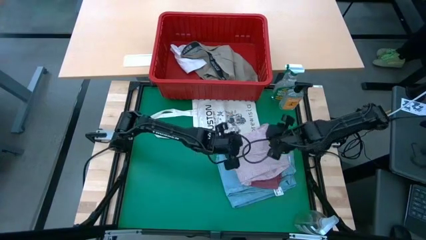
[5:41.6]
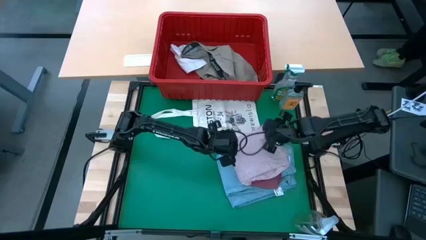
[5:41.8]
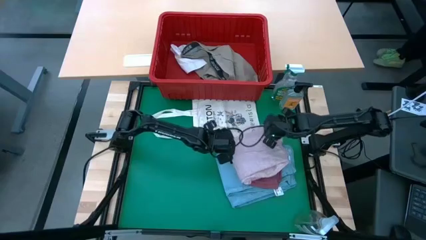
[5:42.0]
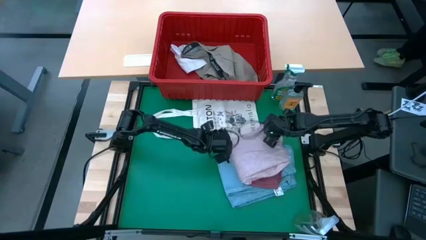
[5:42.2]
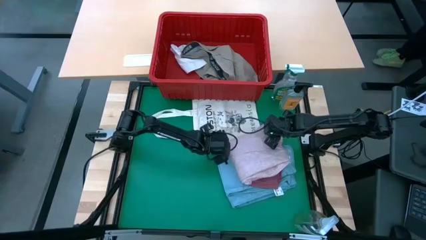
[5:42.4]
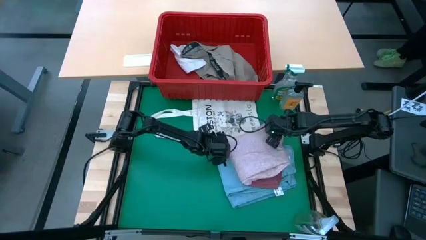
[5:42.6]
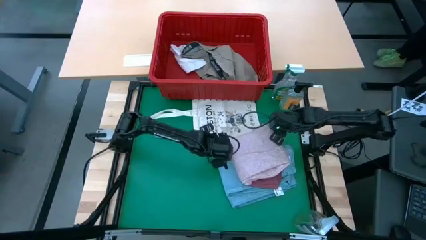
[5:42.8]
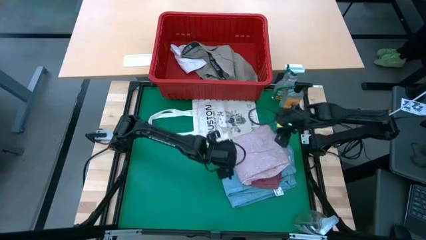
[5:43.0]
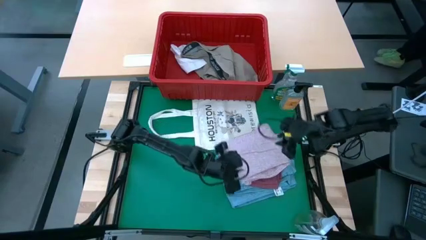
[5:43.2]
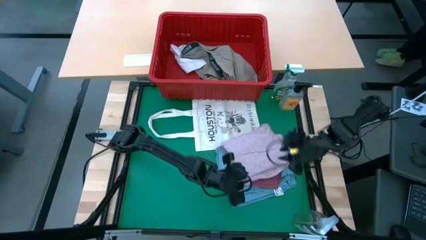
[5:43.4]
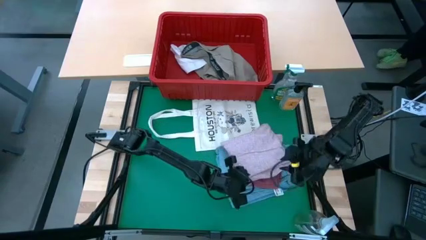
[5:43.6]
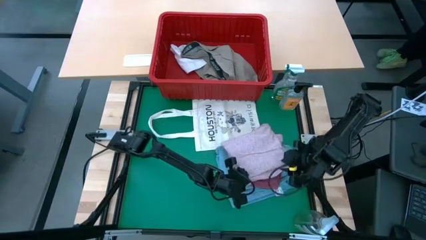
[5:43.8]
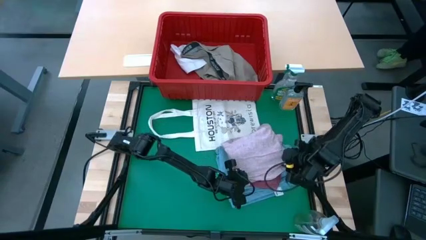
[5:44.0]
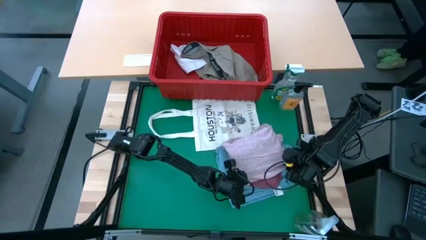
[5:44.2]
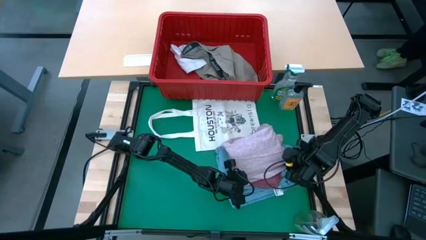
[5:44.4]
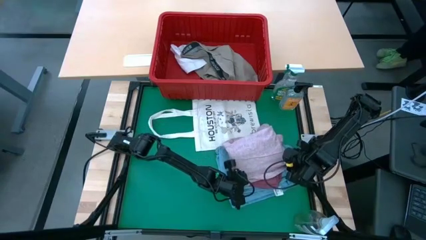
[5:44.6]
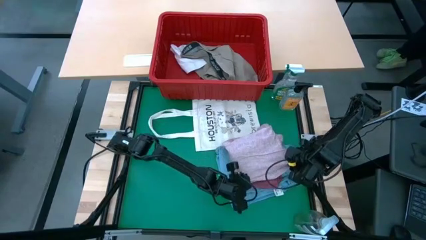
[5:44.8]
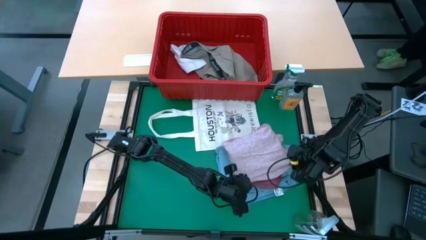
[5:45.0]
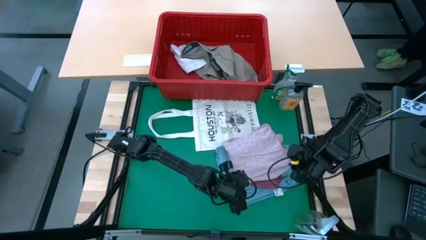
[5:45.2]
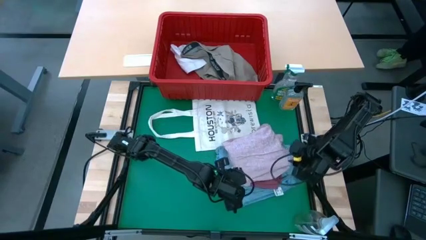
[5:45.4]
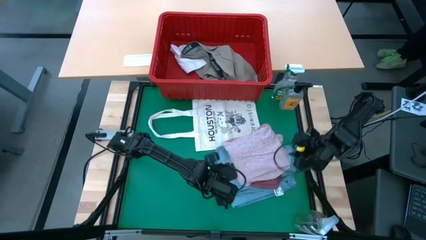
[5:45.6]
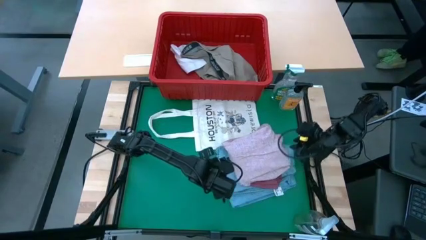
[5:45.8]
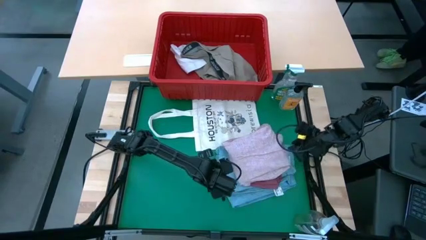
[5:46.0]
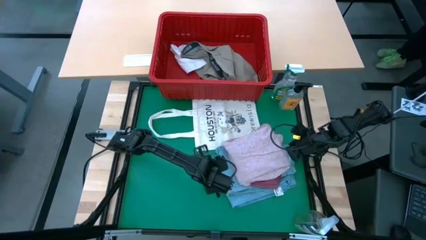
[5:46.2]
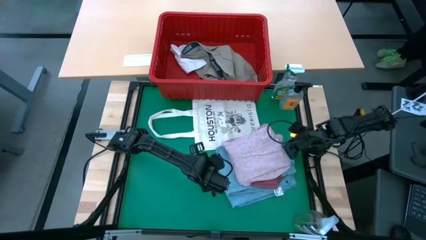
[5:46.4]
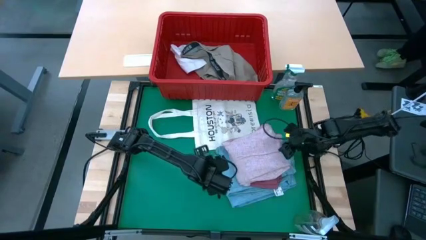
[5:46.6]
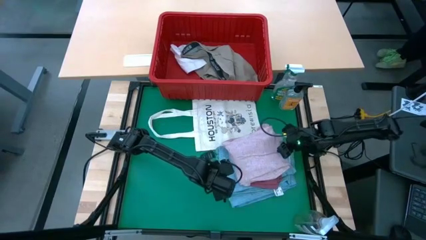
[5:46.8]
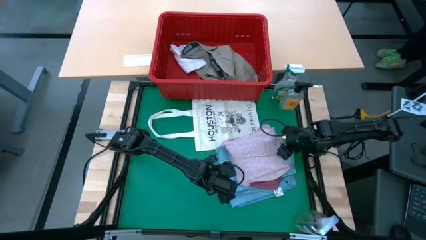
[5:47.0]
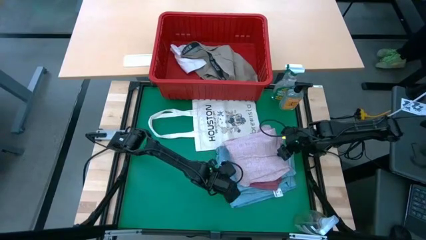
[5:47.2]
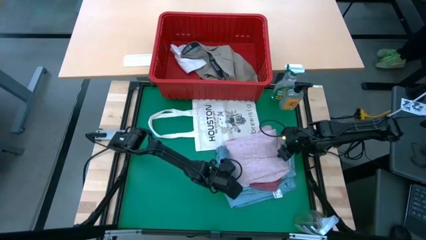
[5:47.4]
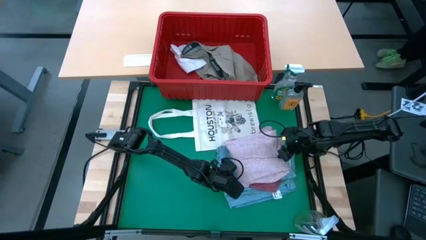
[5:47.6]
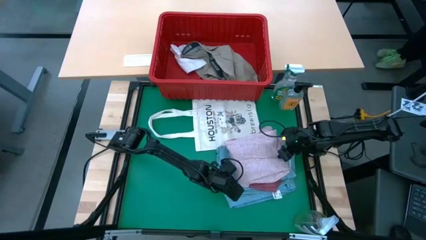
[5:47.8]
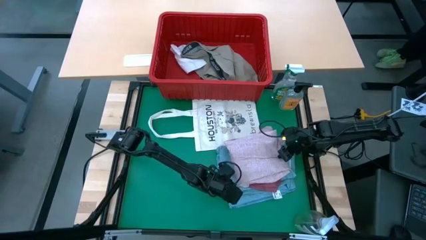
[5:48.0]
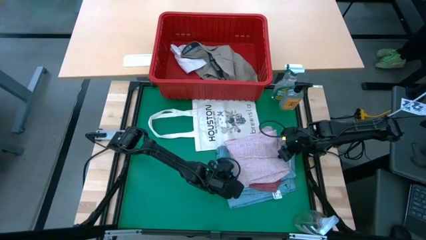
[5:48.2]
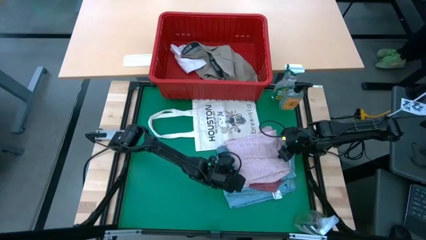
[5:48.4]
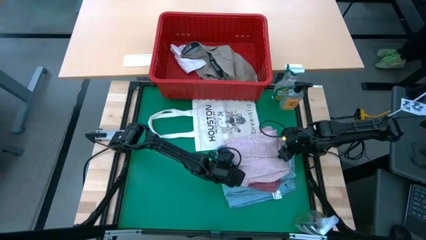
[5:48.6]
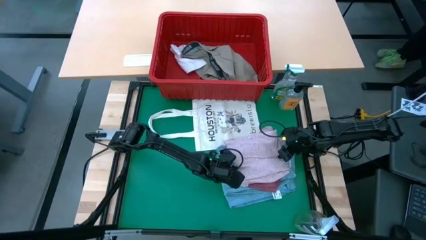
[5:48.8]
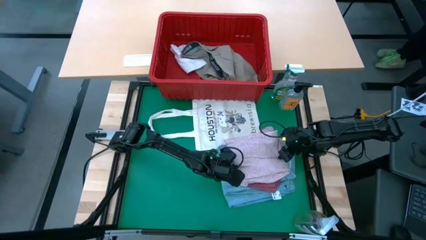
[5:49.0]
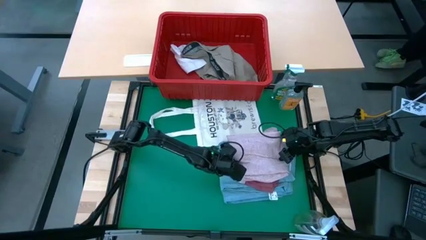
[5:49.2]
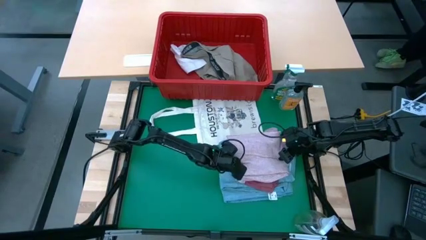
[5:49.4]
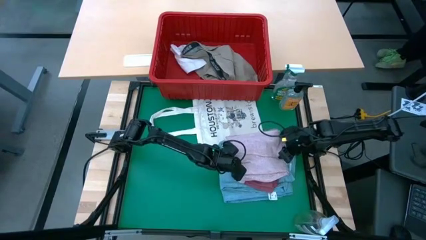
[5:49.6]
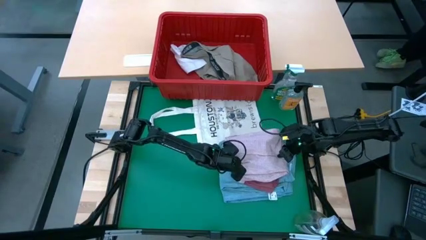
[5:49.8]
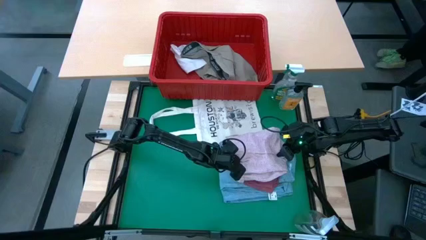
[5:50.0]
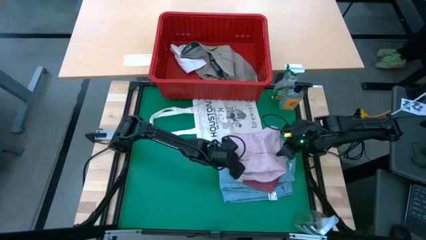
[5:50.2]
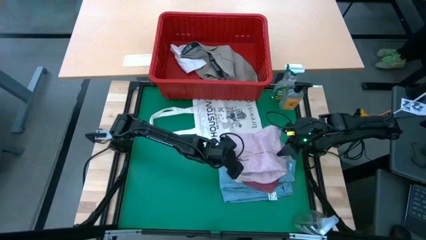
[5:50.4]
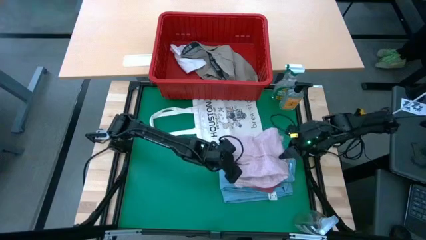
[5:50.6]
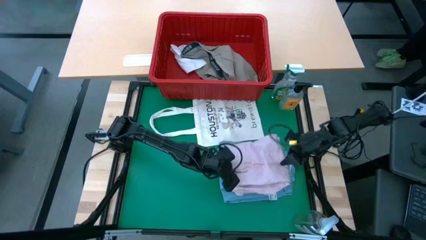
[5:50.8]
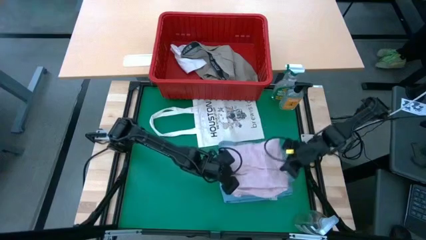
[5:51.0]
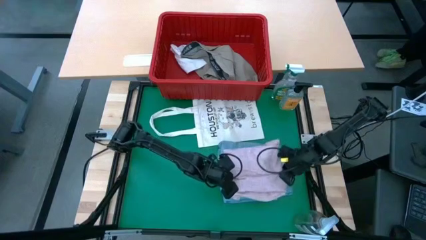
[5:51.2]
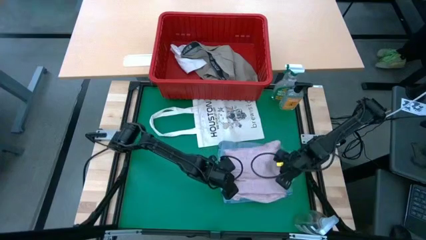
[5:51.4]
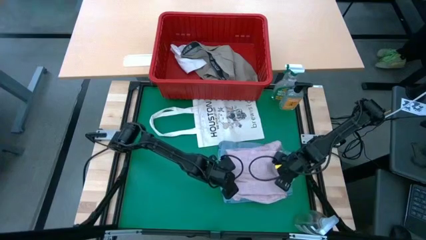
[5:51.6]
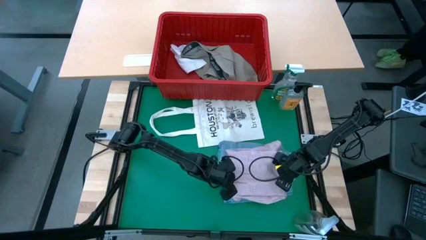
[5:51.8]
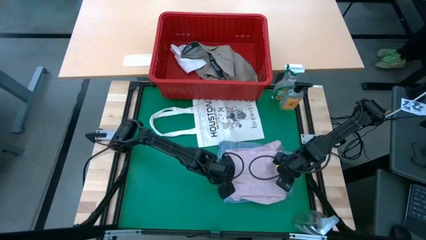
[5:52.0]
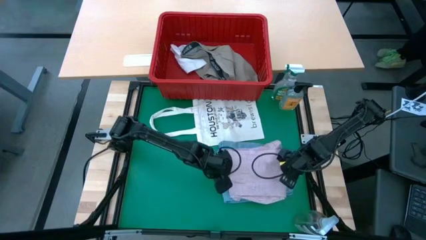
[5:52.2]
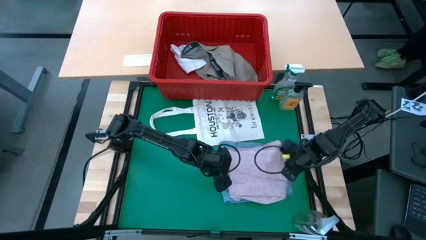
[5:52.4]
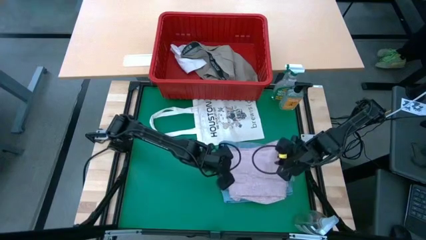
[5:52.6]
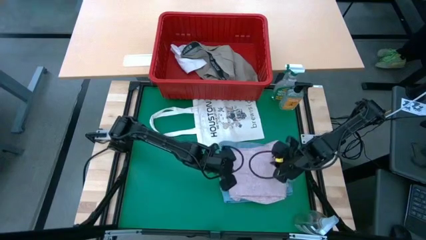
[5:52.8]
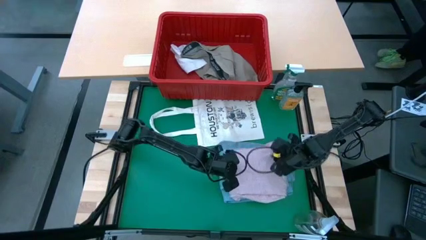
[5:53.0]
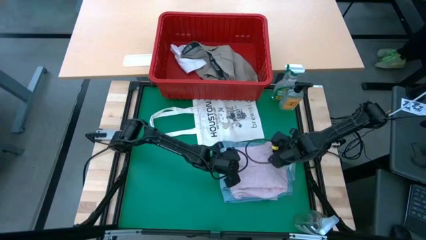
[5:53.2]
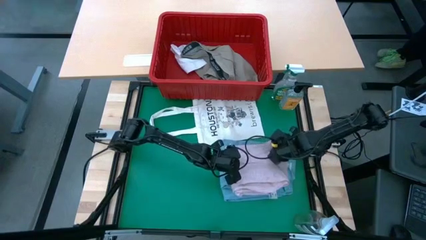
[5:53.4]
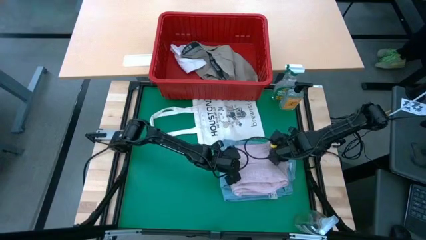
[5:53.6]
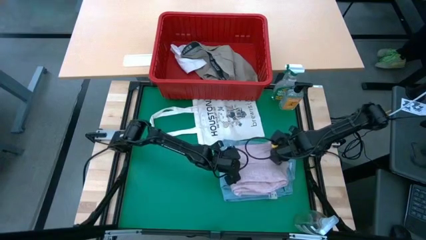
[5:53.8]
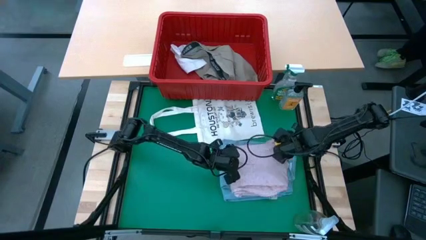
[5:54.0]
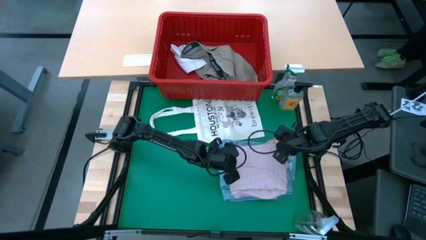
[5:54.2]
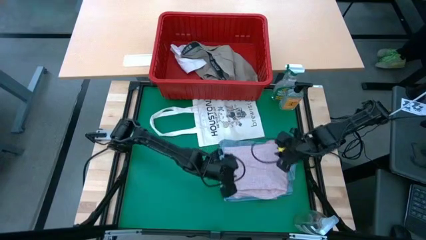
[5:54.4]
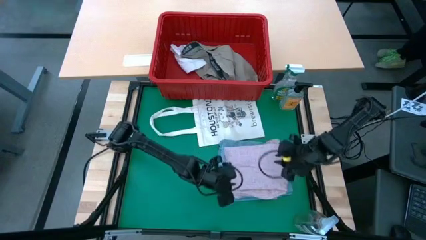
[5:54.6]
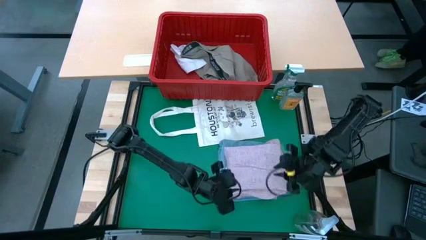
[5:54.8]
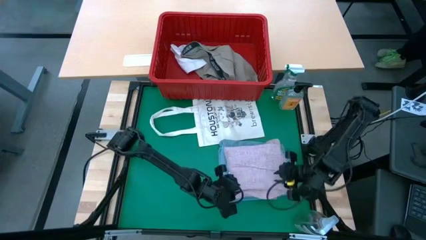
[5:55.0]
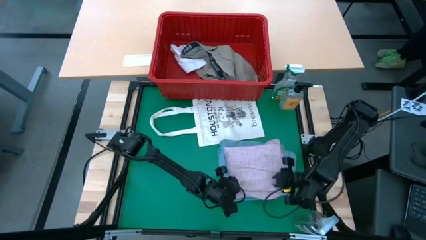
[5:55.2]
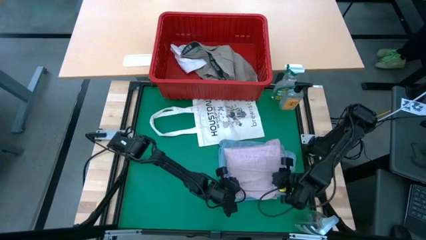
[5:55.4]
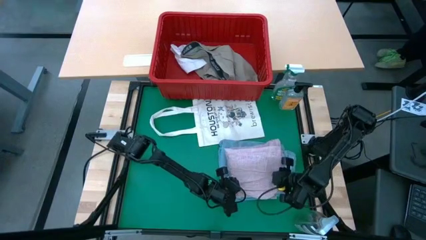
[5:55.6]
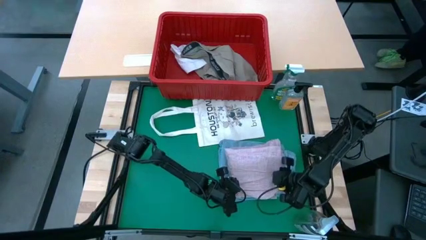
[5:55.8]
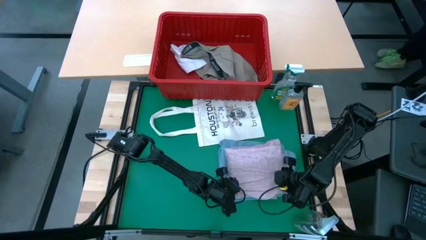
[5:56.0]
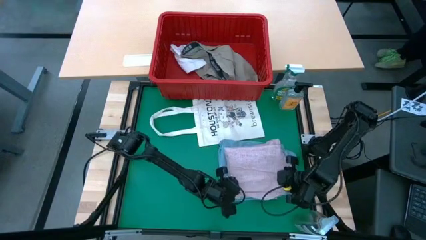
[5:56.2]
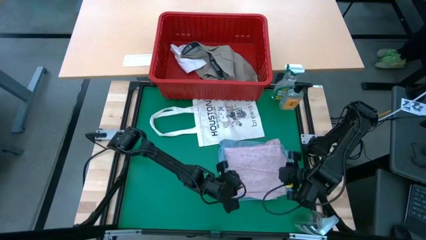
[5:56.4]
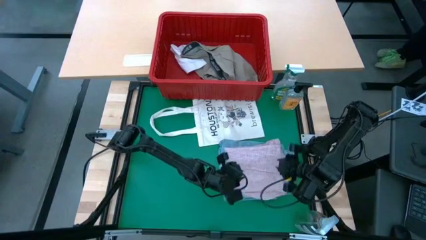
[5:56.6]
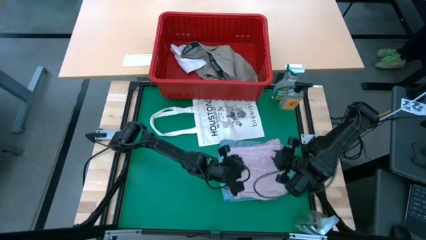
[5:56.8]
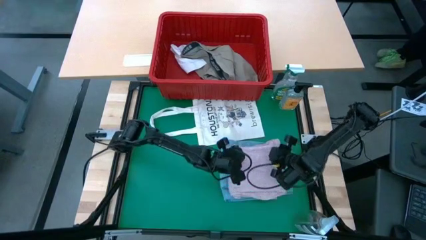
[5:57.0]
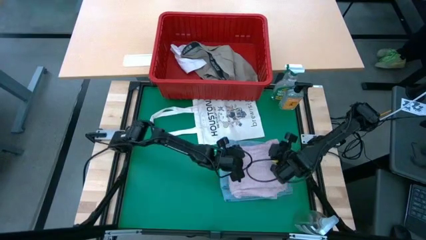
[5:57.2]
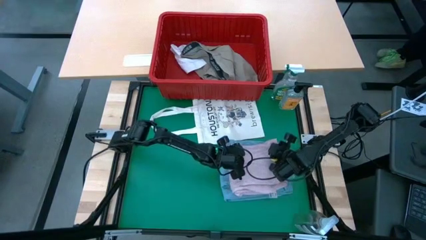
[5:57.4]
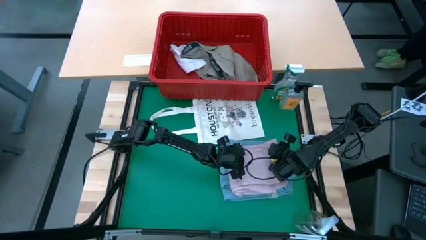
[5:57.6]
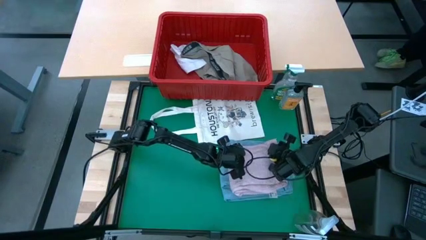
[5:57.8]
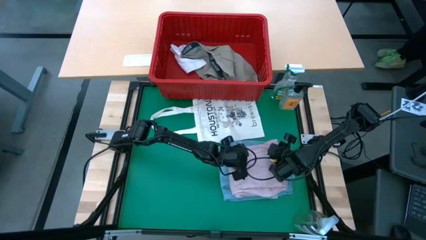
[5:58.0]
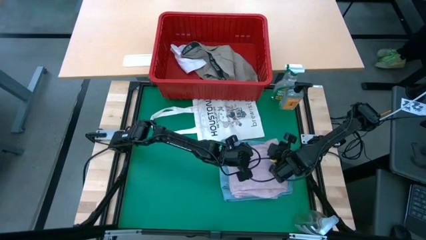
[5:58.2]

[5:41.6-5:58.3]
Task: Fold Laundry from Bin
Fold the pink shirt from the red laundry basket
